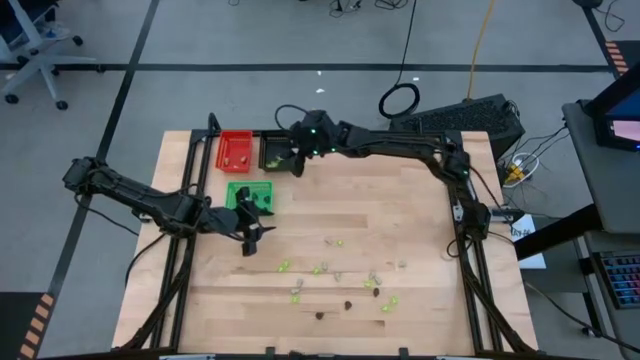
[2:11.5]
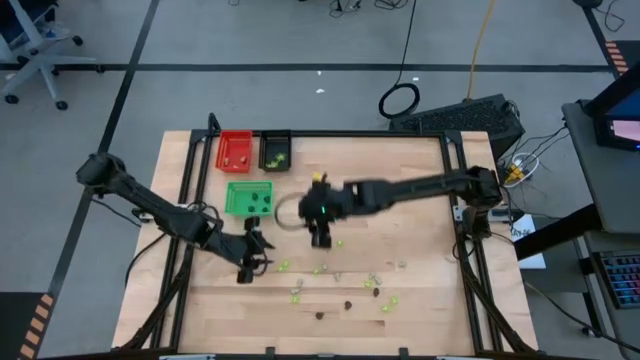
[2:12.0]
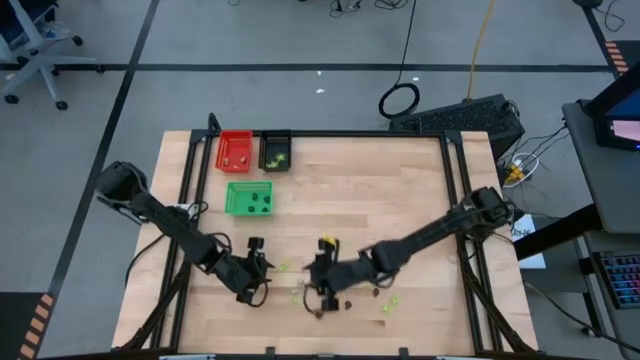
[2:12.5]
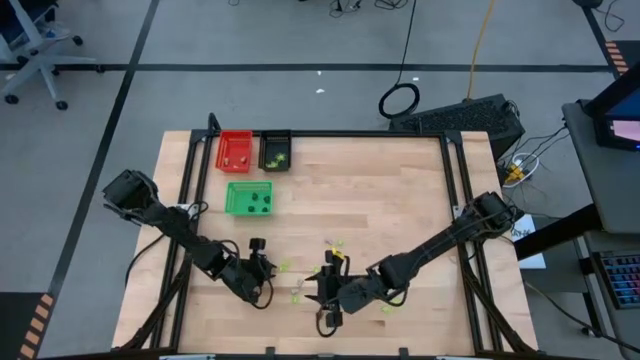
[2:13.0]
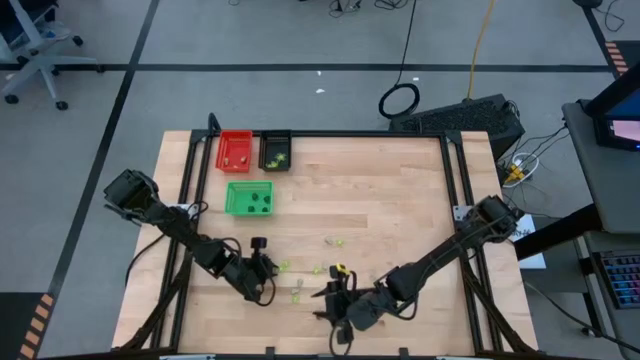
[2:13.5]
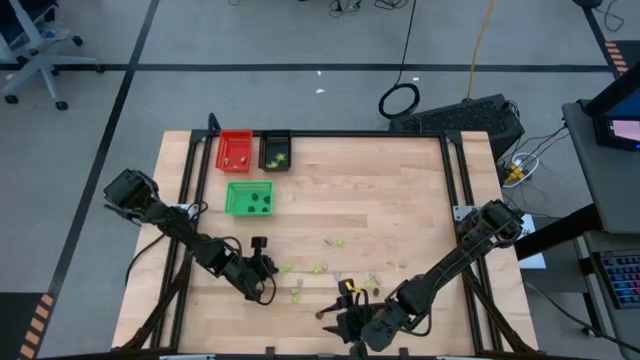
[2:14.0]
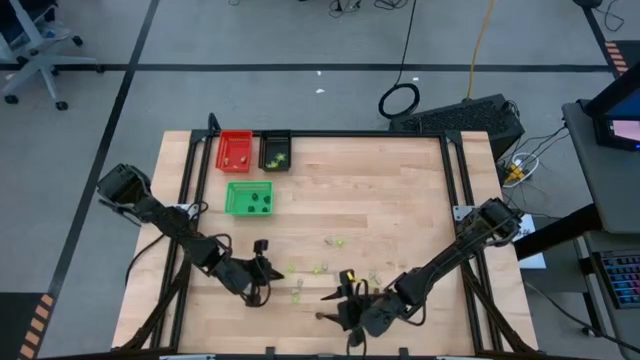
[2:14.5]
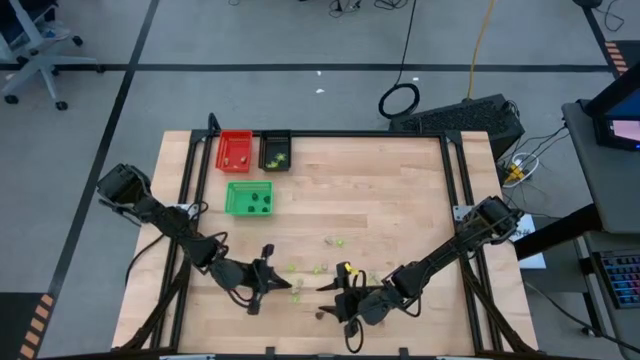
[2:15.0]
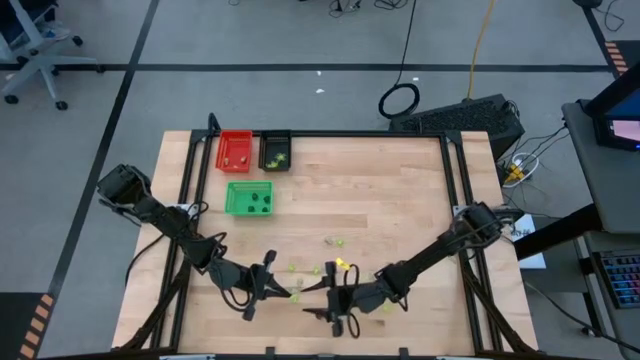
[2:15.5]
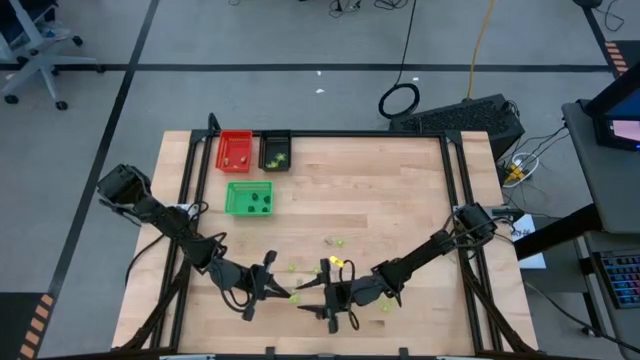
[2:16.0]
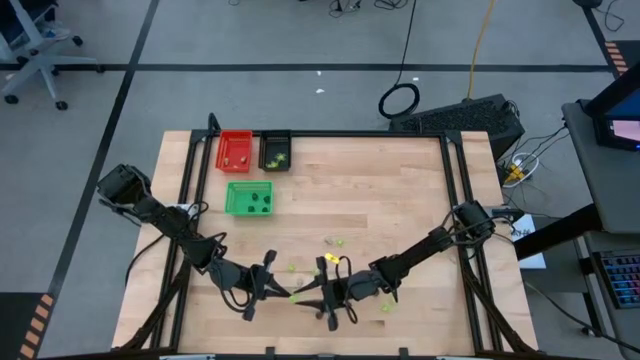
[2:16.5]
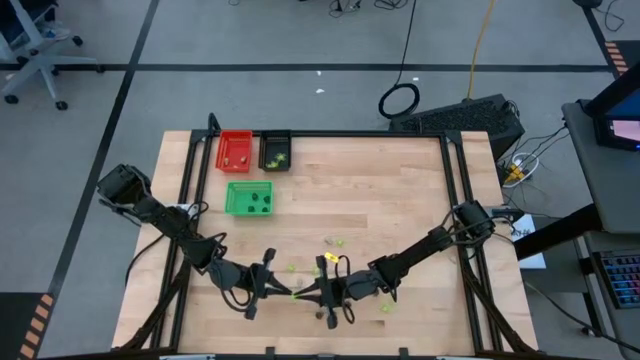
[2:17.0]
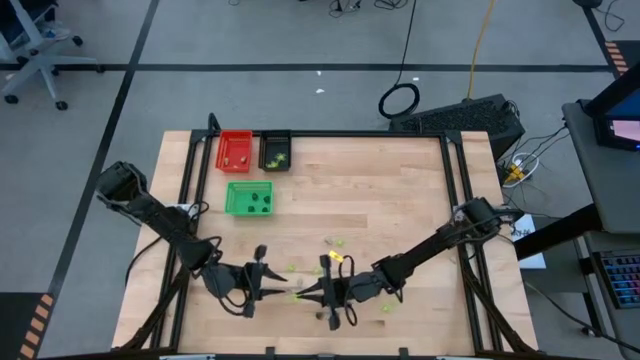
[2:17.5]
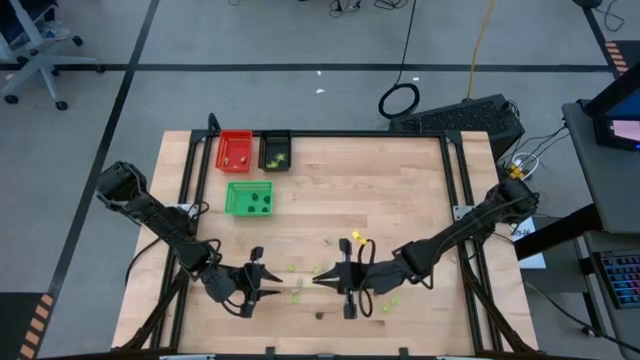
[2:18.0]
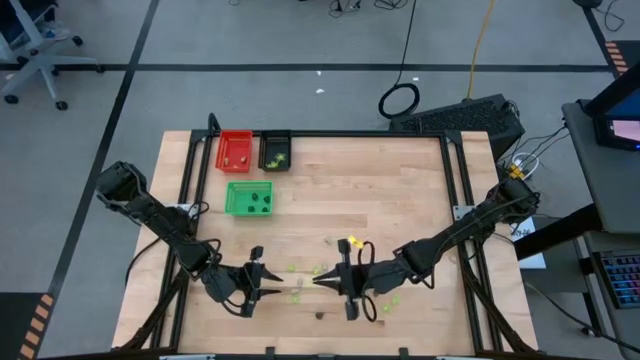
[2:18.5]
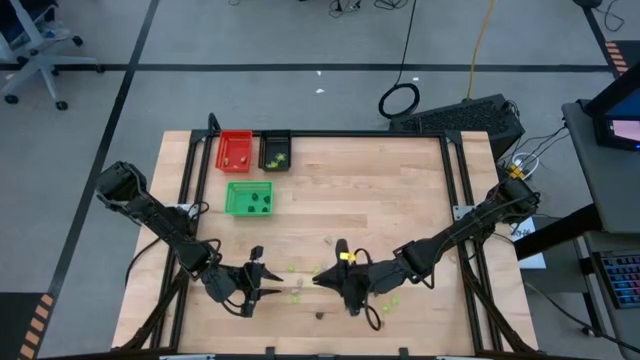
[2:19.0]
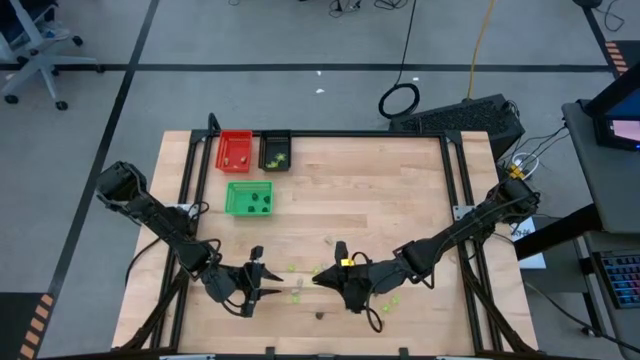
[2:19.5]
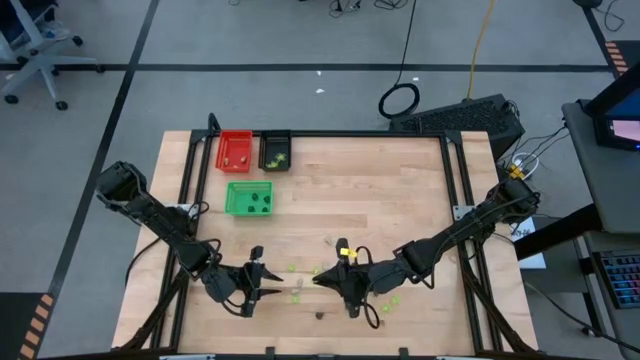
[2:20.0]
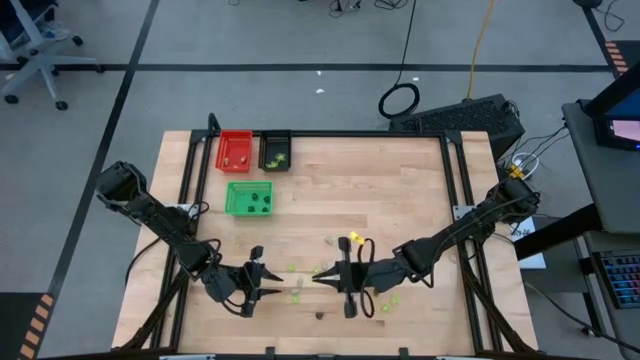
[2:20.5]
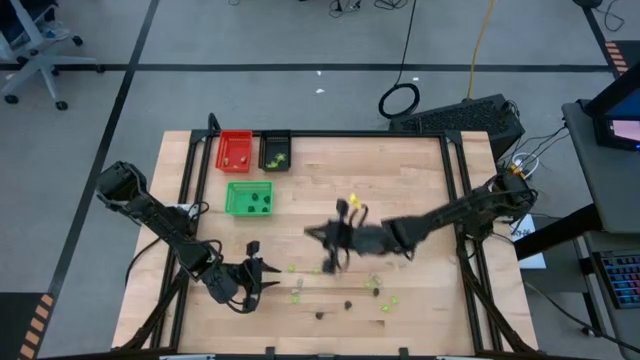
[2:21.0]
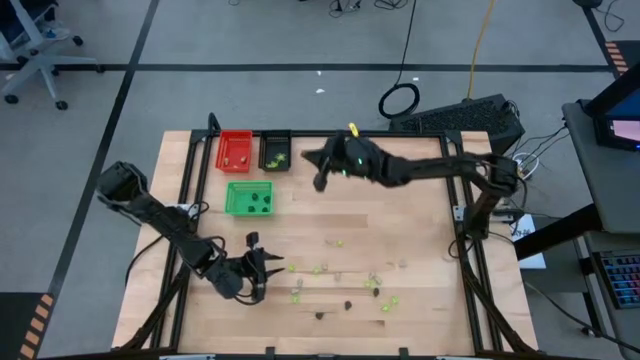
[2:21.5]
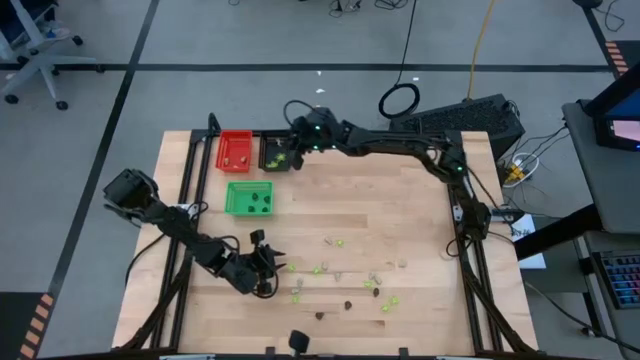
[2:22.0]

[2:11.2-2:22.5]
Task: Sort Halloween decoration
Put the green spider toy into the black bin

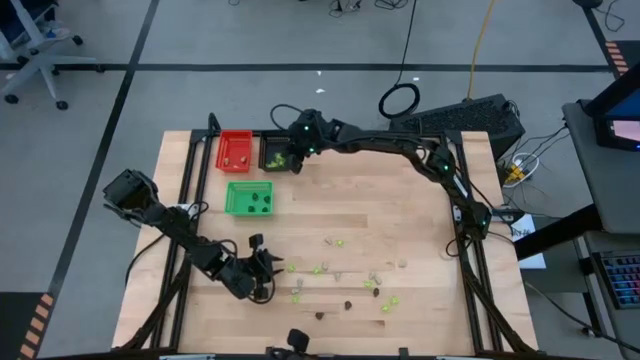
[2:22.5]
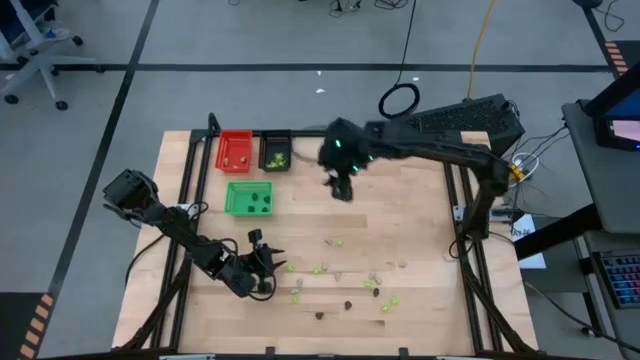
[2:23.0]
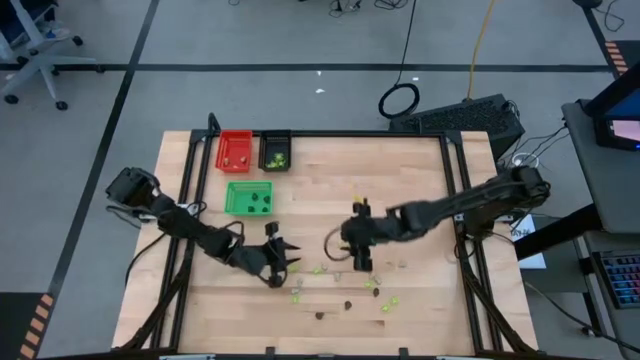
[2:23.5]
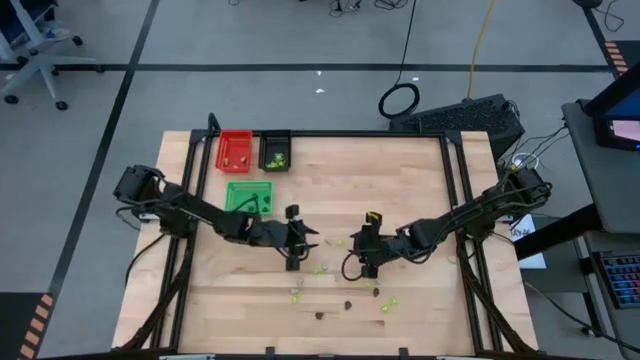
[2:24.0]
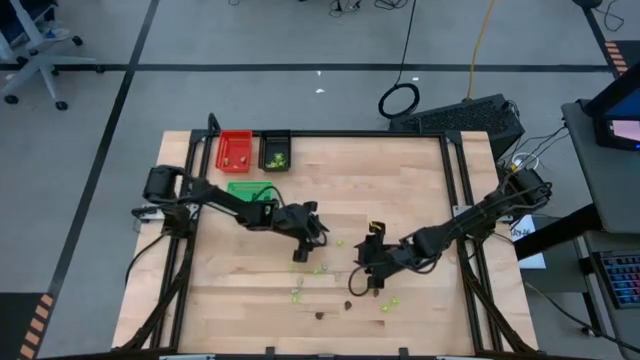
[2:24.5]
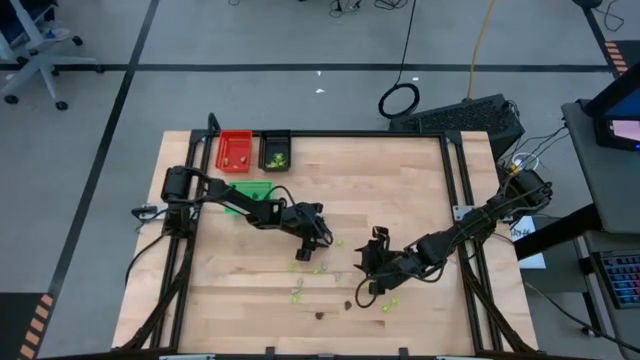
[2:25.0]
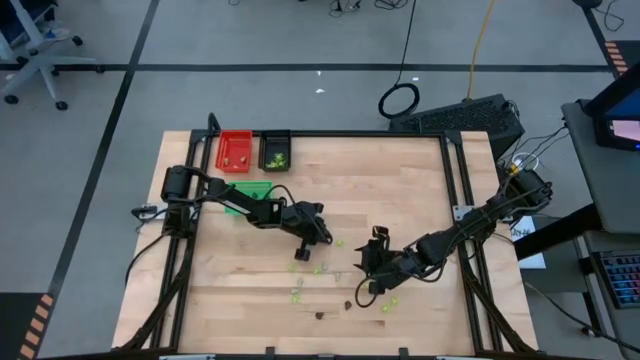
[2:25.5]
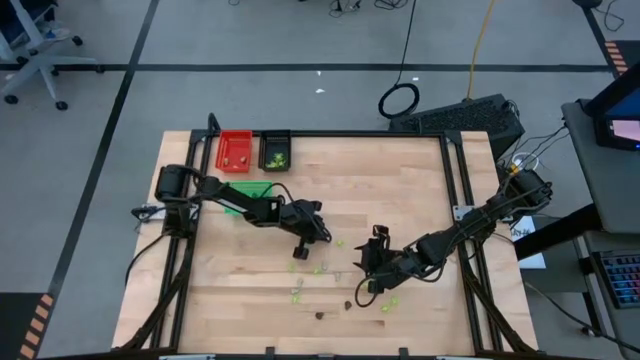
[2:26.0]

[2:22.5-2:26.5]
Put the white skull toy into the red bin

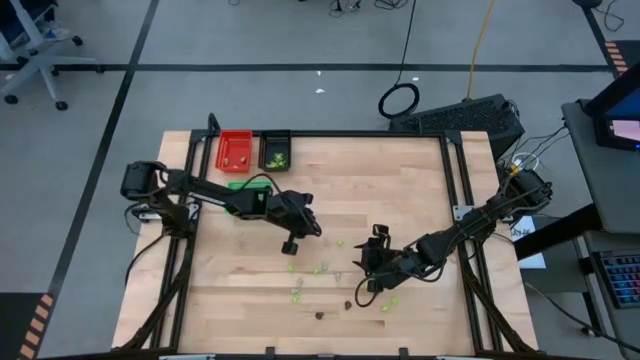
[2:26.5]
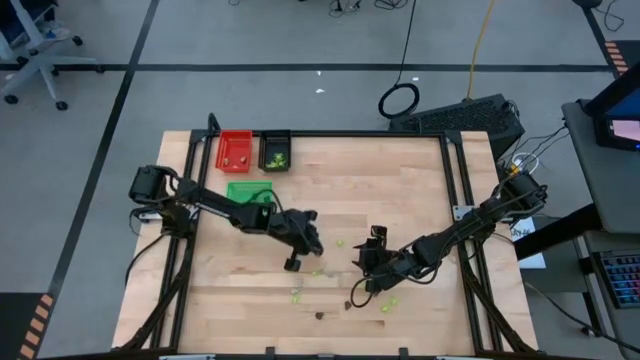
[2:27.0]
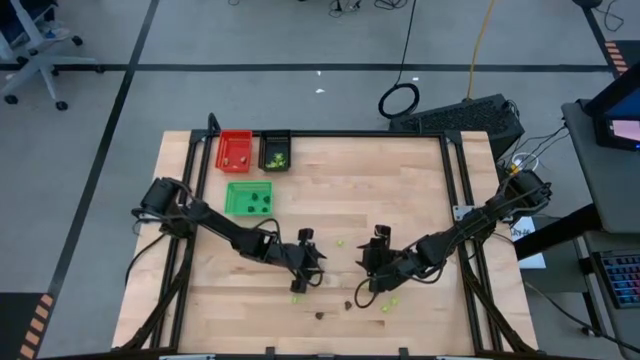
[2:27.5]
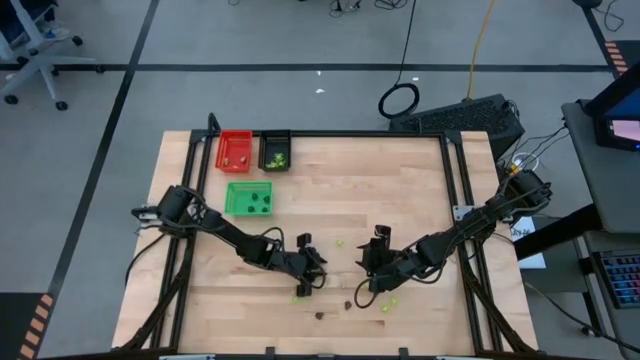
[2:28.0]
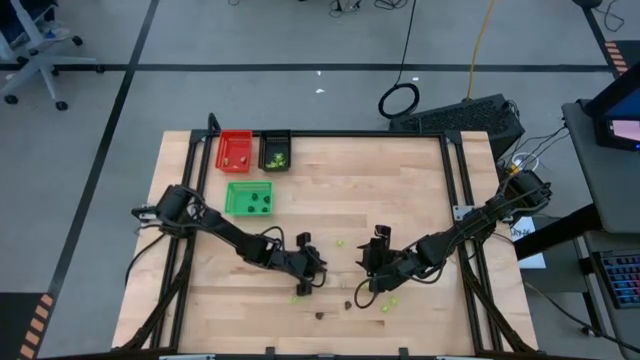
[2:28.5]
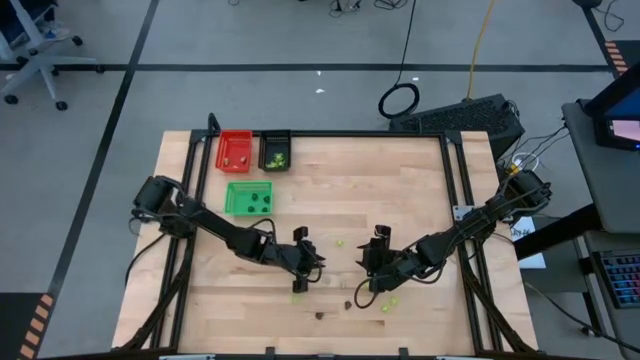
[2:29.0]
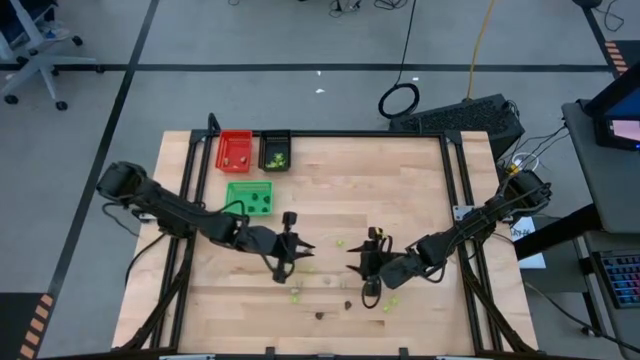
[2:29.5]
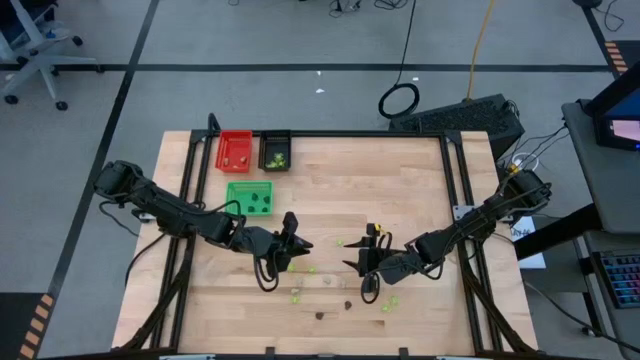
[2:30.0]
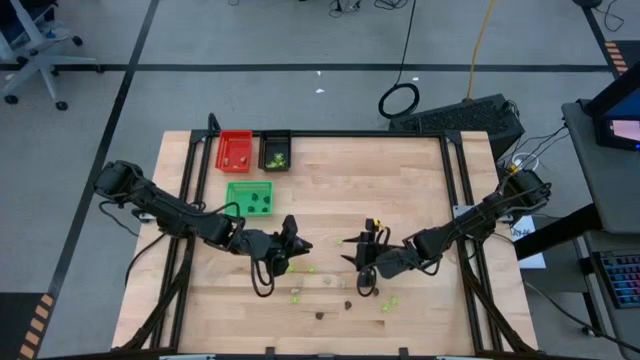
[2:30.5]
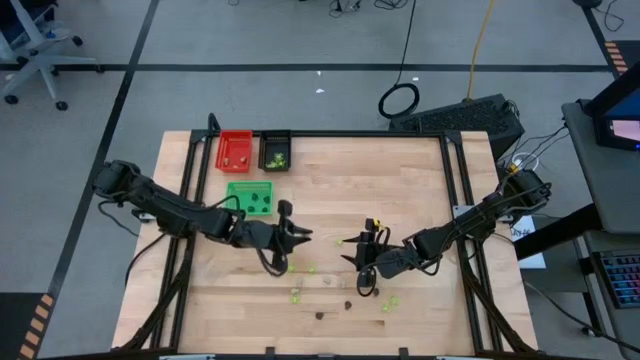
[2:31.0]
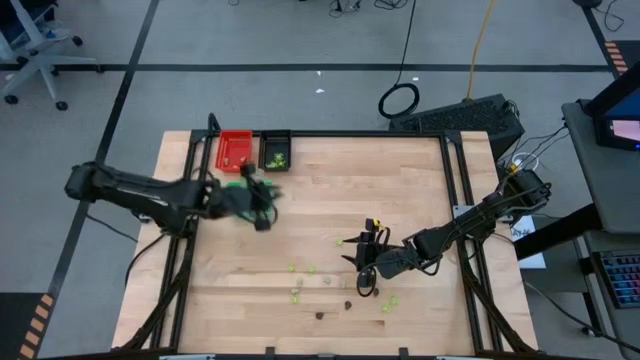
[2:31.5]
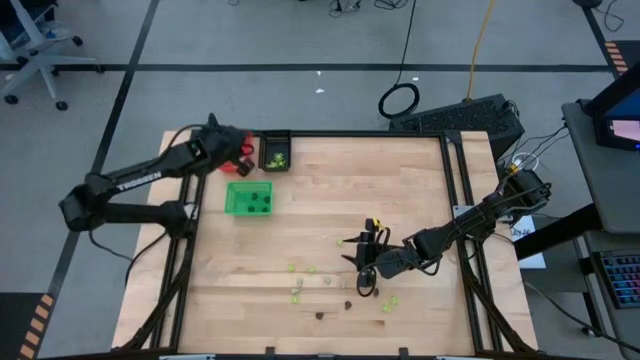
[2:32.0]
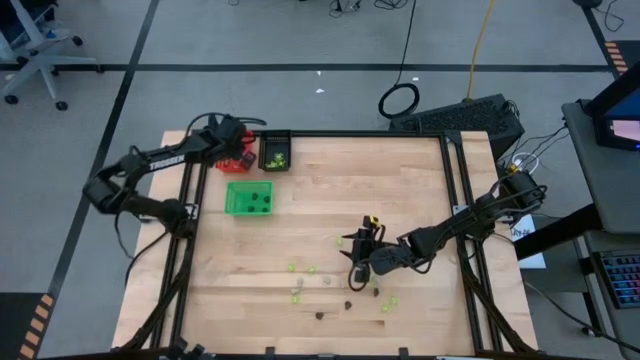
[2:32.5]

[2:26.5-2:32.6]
Put the white skull toy into the red bin

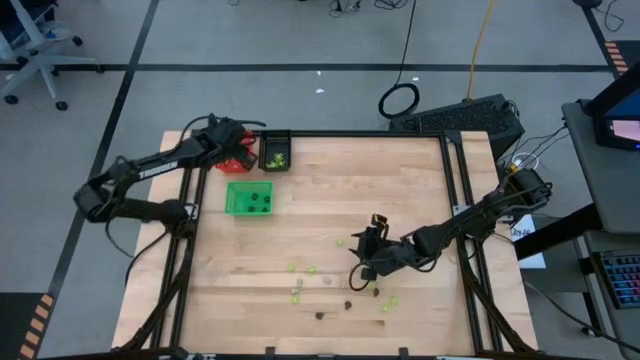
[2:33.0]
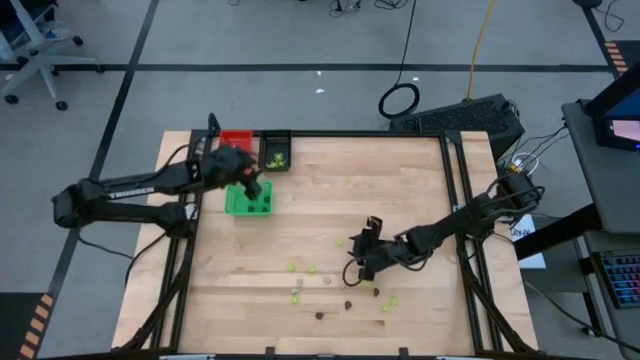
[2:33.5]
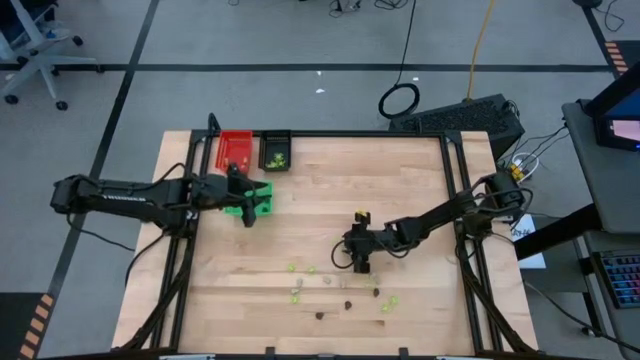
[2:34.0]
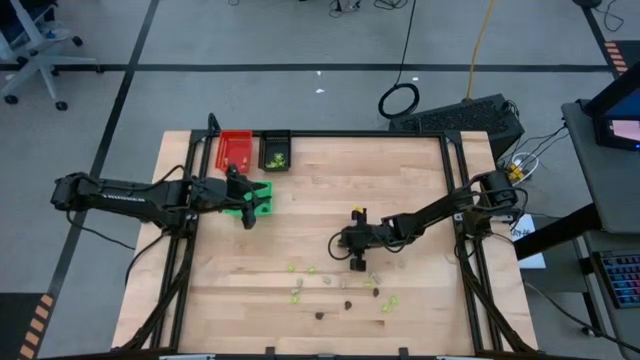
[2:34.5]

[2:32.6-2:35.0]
Put the green spider toy into the black bin
